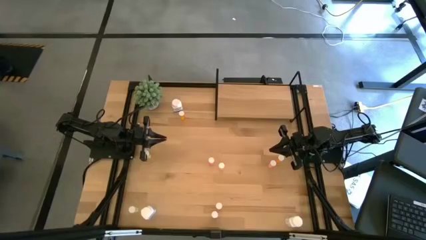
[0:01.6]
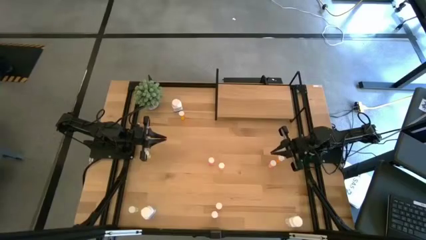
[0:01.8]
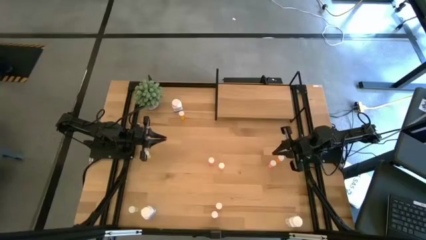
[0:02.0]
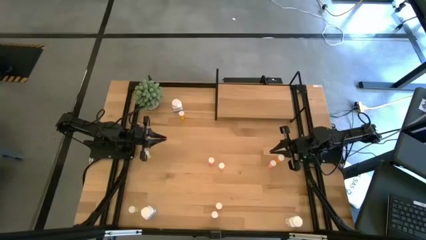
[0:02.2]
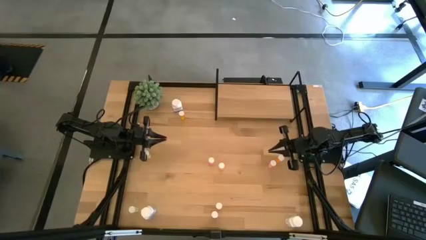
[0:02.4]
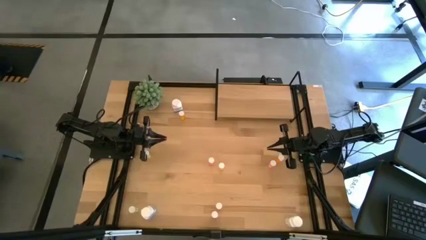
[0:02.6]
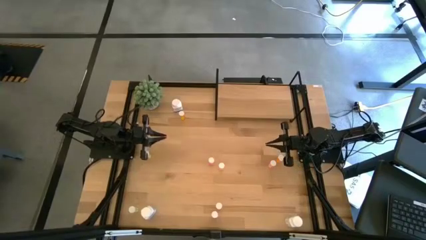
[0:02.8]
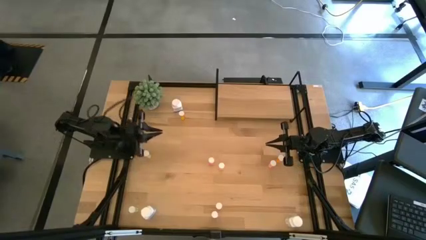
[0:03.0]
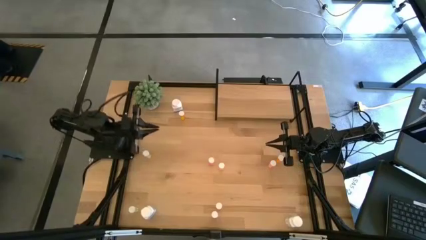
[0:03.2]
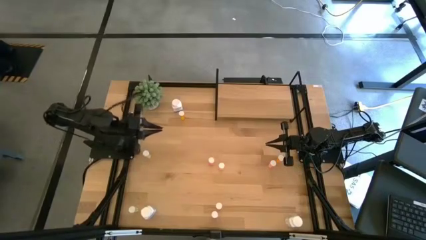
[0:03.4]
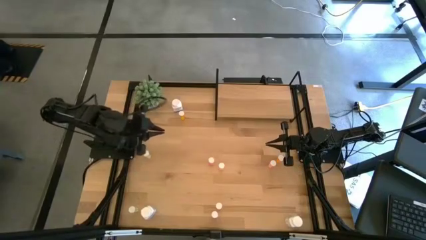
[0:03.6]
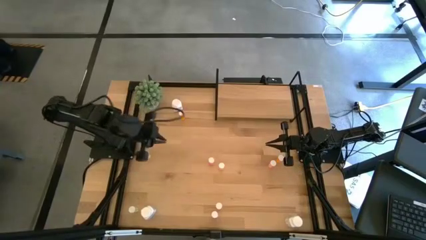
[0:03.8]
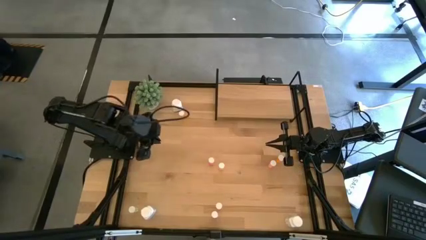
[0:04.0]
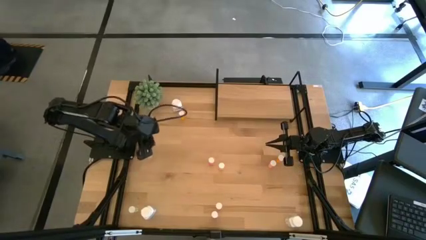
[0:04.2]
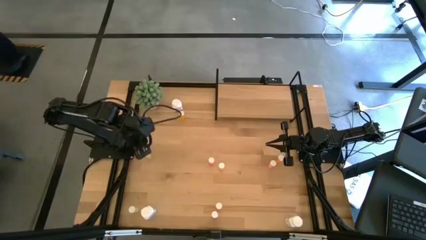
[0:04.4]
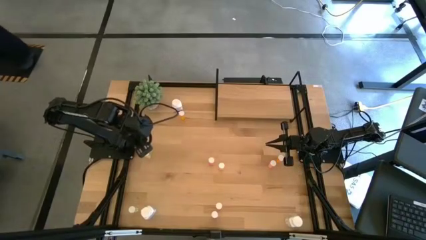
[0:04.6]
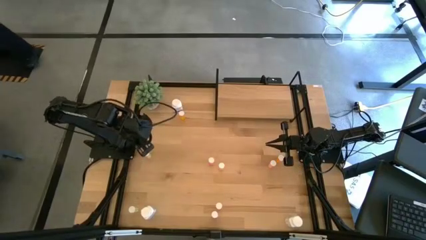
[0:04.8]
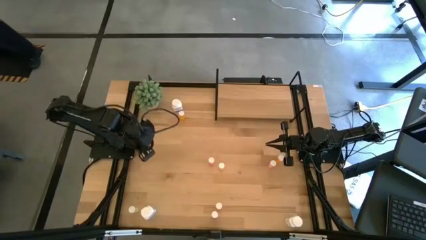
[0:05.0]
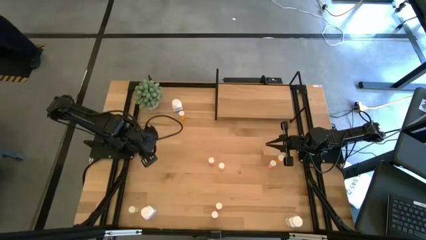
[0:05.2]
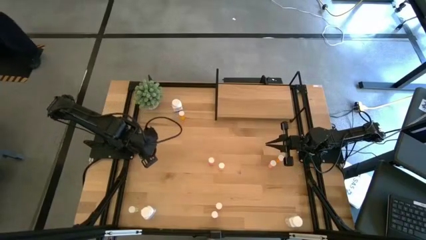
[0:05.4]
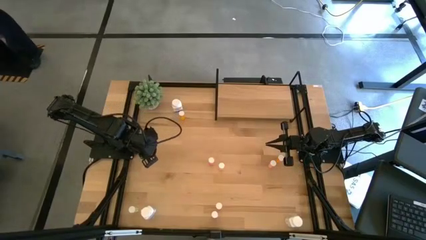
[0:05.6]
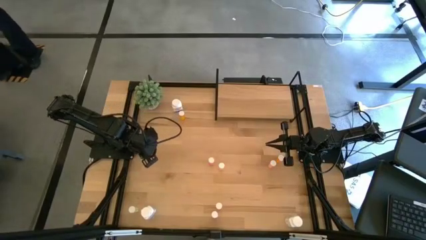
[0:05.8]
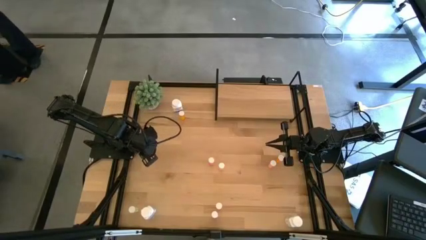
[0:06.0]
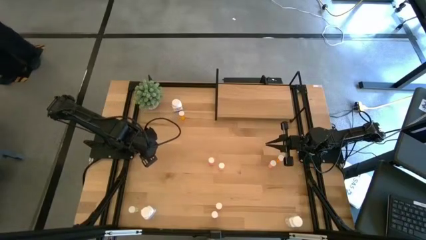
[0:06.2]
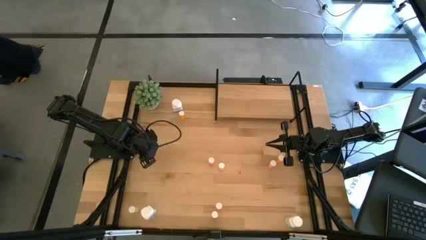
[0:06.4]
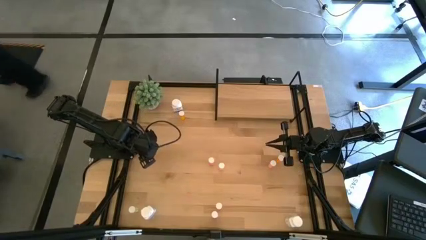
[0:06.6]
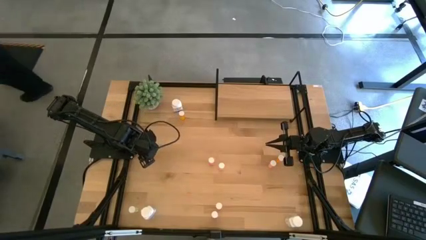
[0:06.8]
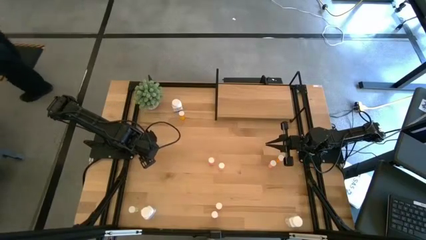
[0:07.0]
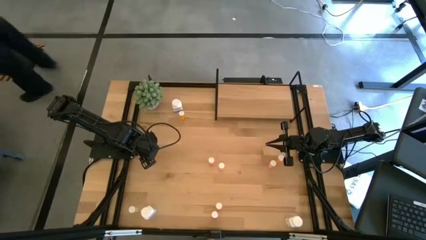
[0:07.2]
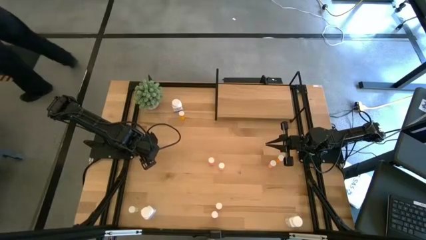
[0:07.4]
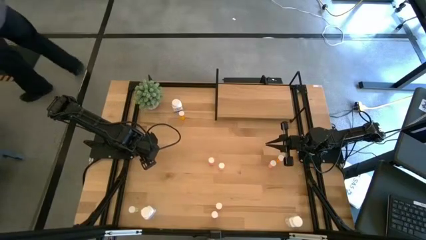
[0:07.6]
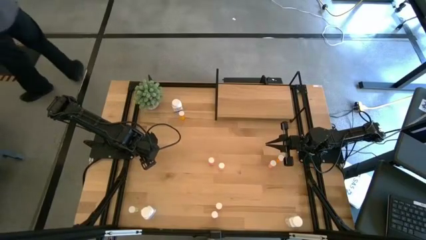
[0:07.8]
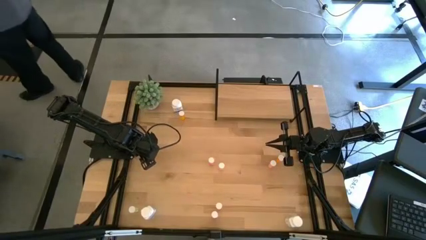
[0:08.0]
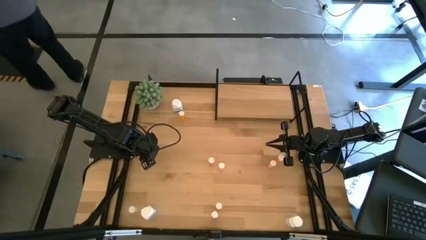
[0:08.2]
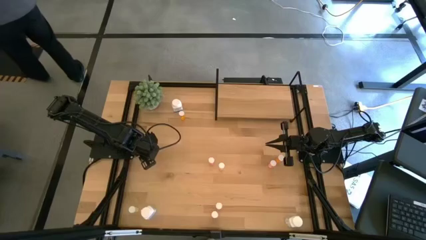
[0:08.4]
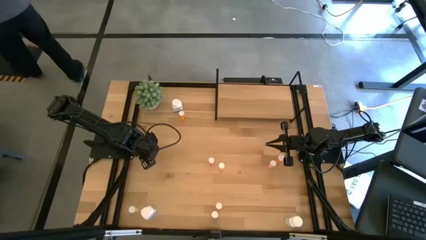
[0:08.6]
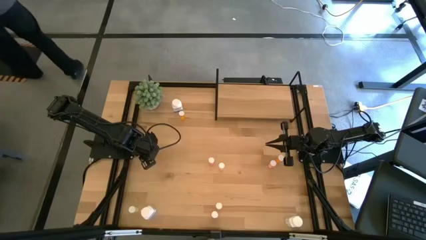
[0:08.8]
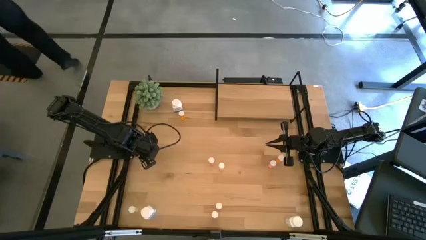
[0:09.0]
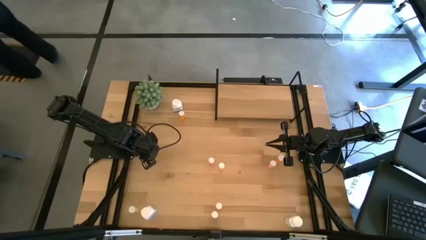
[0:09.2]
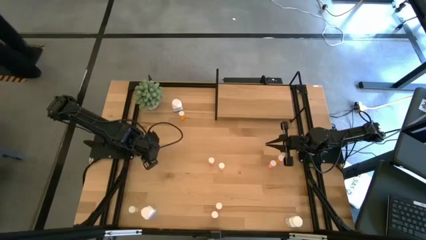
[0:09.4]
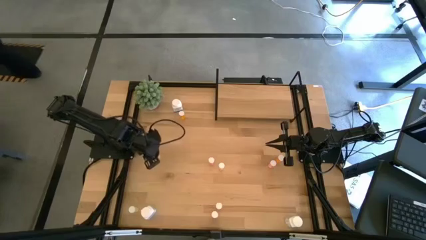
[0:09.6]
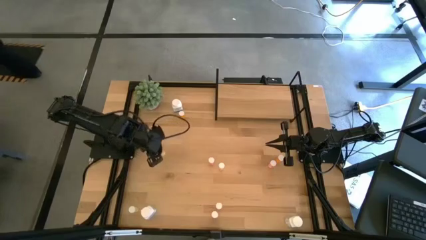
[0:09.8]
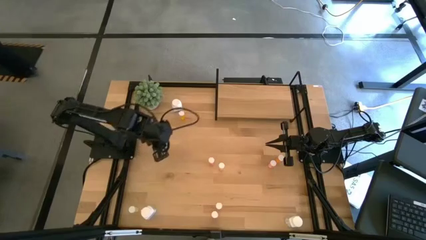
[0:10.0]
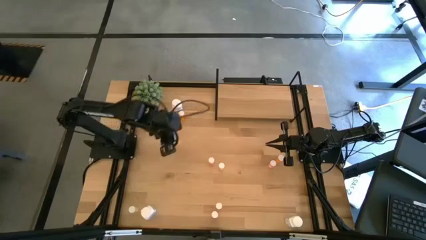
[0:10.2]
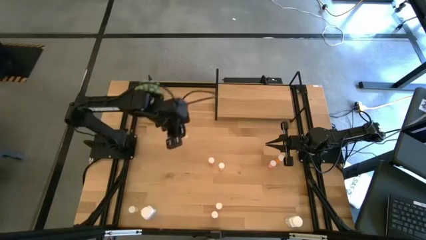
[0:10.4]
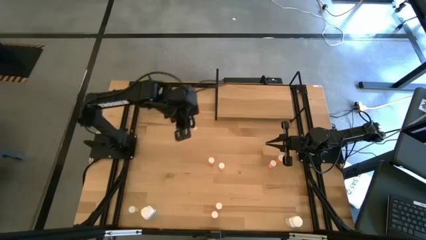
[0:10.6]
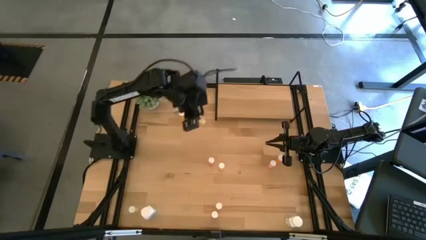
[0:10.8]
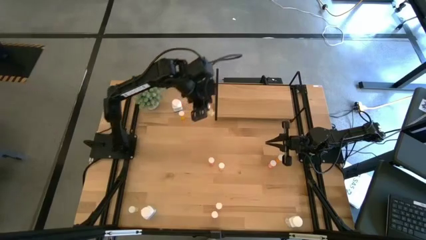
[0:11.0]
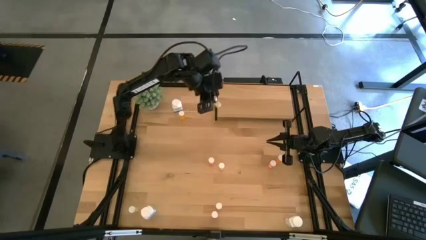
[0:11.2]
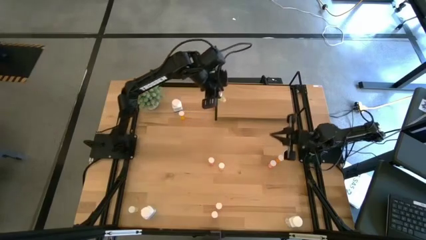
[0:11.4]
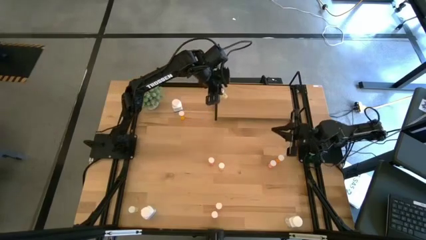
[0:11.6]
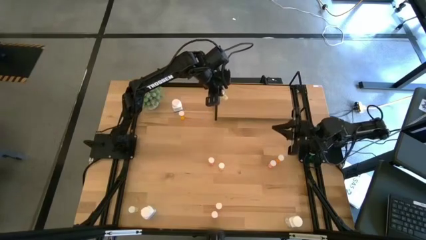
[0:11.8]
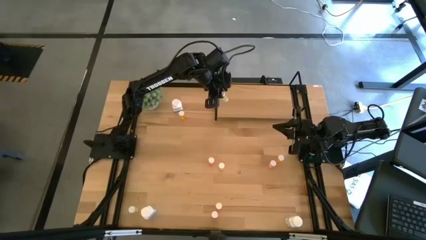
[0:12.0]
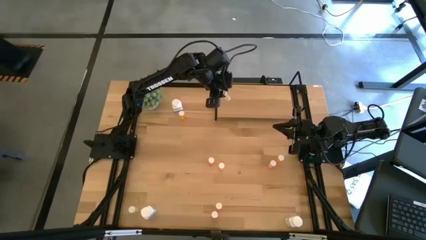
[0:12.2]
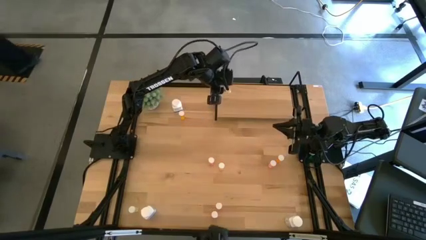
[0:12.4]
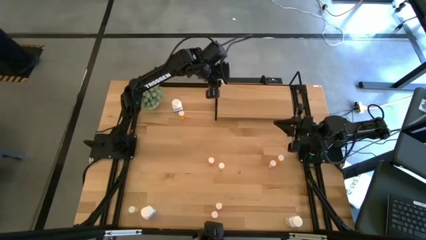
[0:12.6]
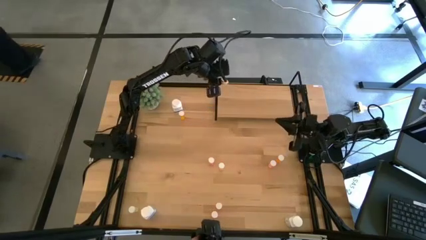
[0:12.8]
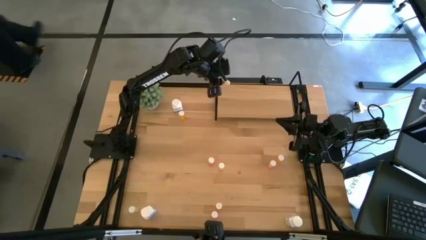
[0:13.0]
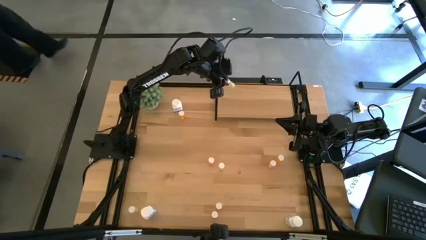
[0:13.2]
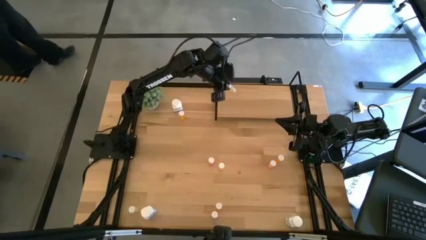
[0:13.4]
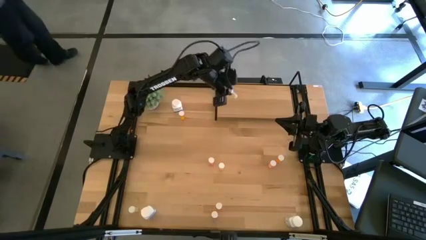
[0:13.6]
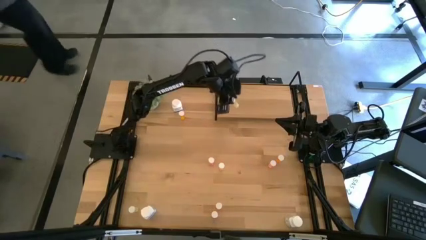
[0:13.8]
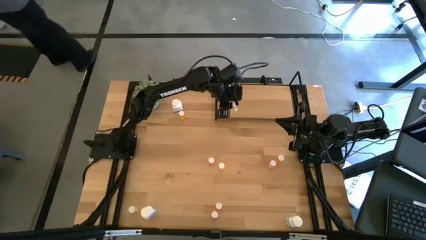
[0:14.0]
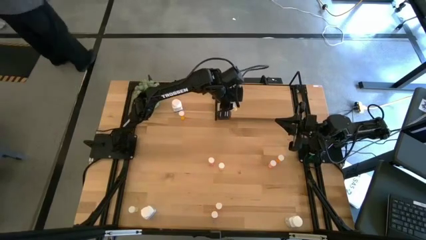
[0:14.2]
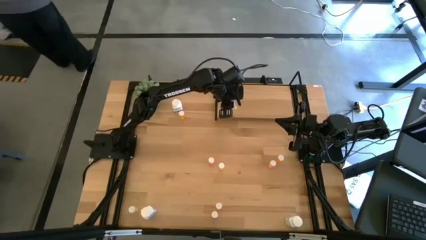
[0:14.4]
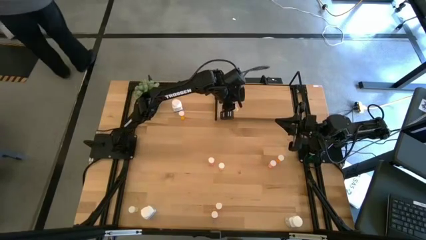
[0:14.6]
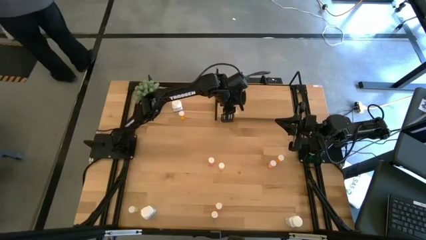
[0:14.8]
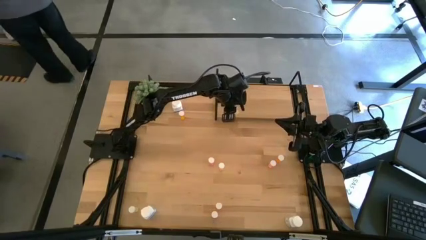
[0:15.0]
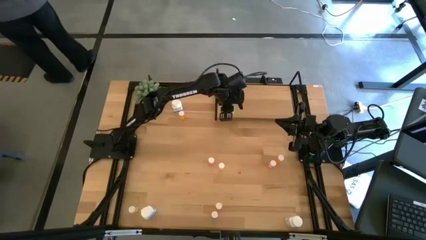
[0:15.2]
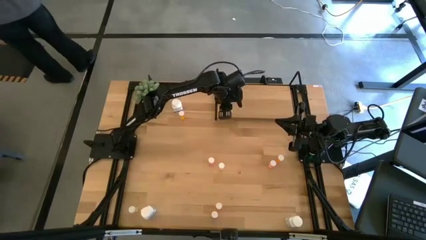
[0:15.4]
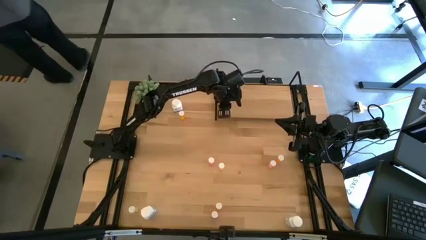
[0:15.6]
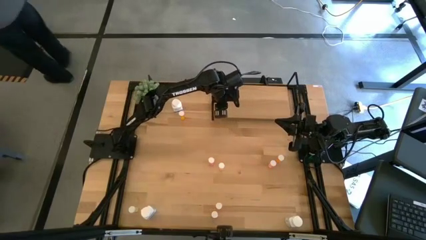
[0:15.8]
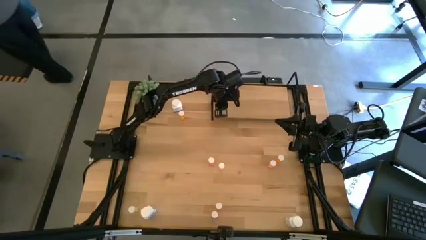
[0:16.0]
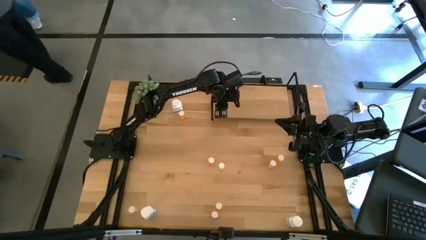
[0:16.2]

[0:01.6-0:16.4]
Task: Pick and place medicine bottles onto shelf by color
Put the top left yellow pill bottle on the shelf
